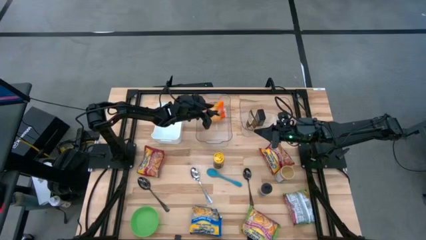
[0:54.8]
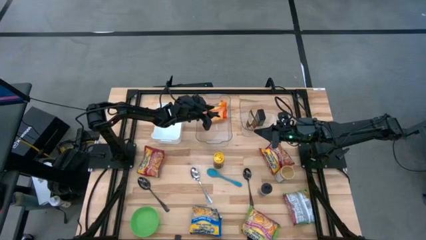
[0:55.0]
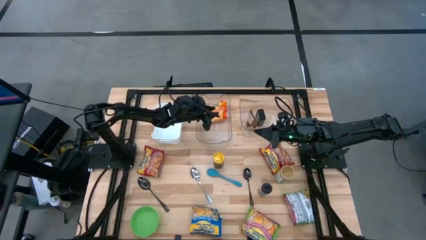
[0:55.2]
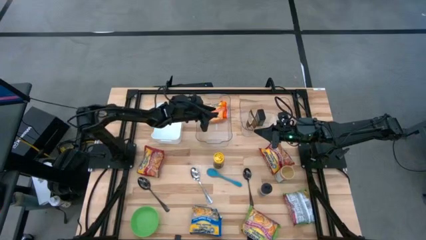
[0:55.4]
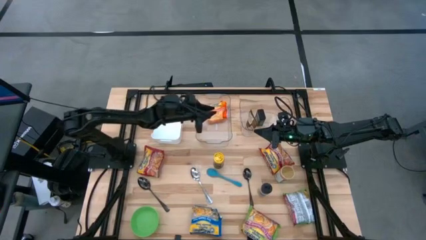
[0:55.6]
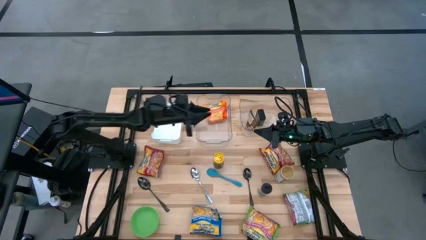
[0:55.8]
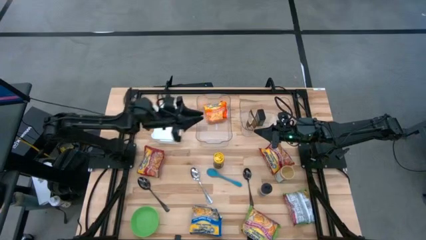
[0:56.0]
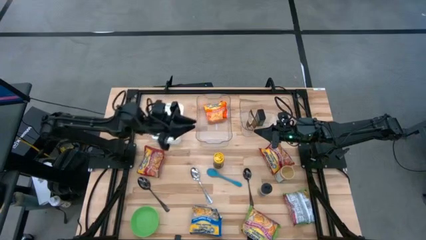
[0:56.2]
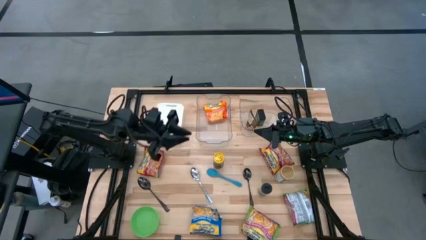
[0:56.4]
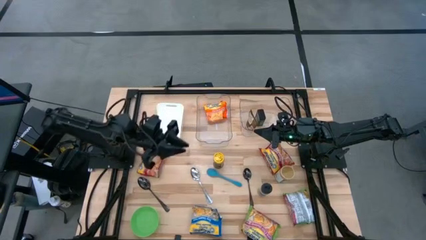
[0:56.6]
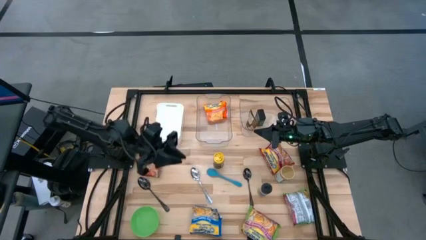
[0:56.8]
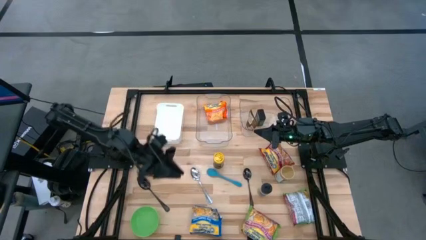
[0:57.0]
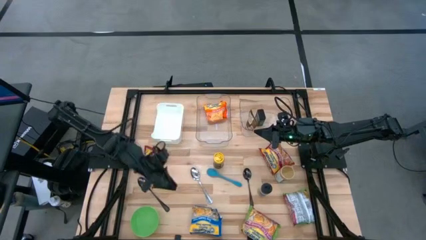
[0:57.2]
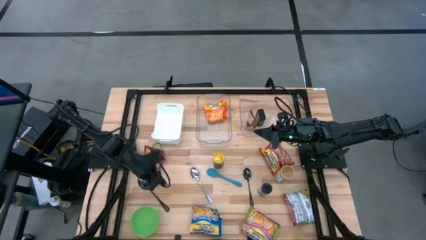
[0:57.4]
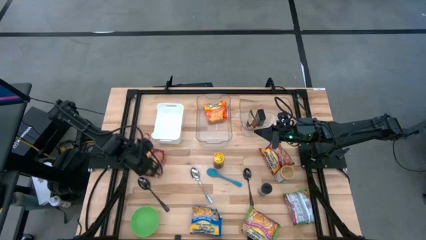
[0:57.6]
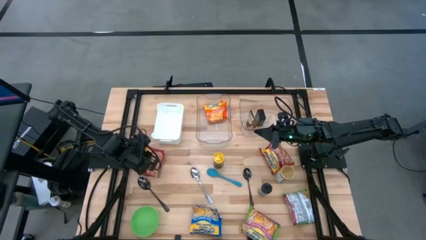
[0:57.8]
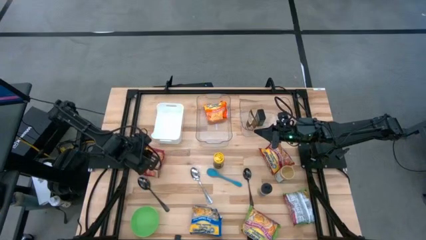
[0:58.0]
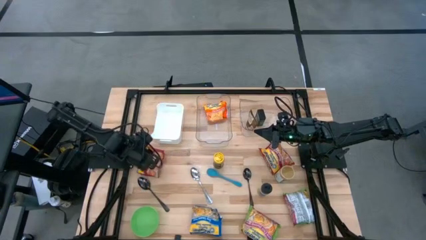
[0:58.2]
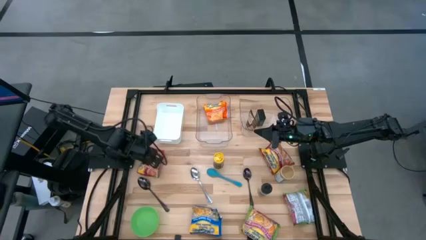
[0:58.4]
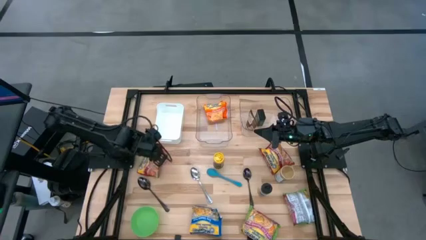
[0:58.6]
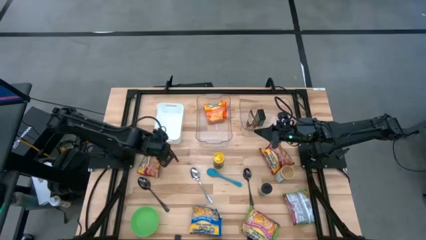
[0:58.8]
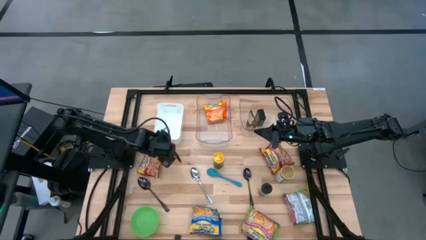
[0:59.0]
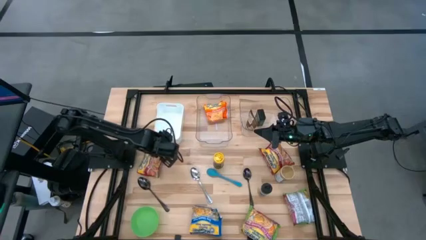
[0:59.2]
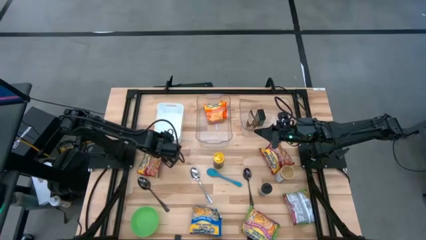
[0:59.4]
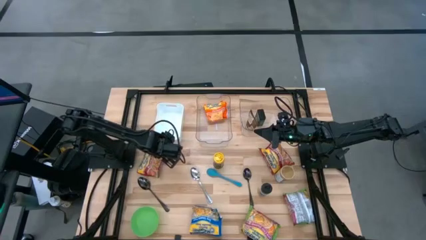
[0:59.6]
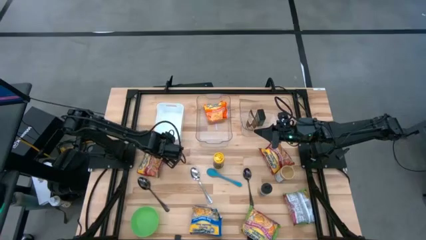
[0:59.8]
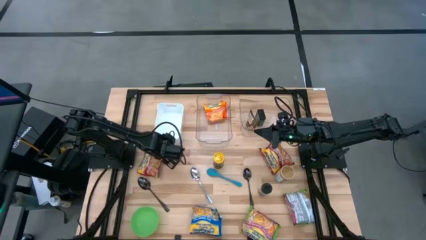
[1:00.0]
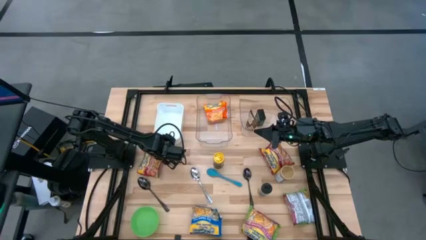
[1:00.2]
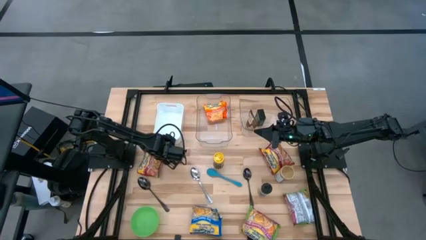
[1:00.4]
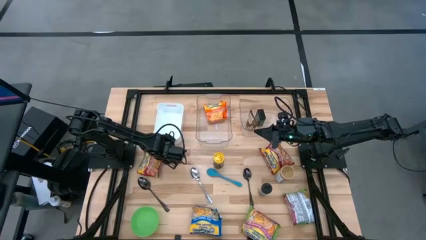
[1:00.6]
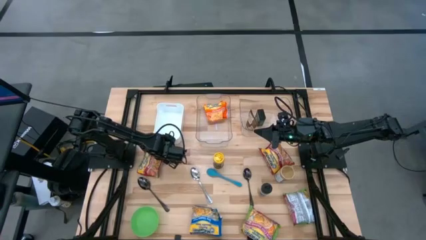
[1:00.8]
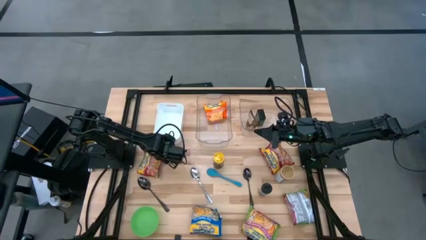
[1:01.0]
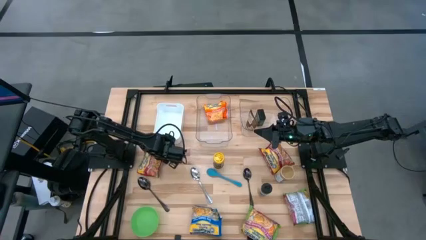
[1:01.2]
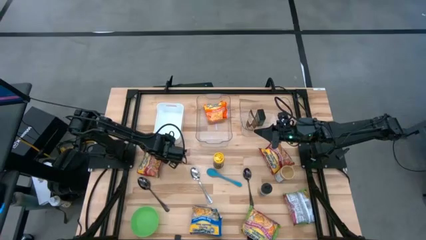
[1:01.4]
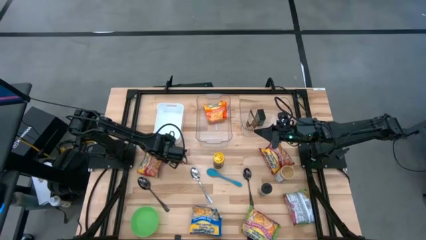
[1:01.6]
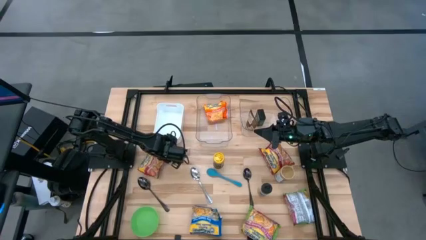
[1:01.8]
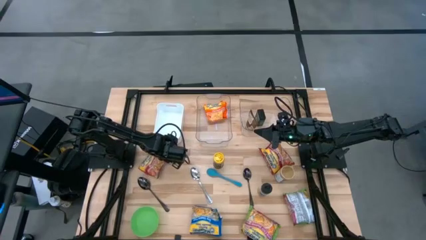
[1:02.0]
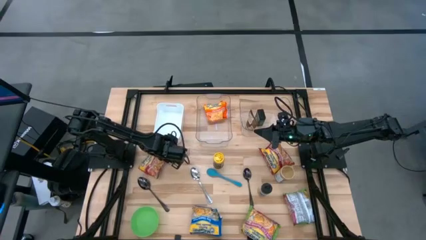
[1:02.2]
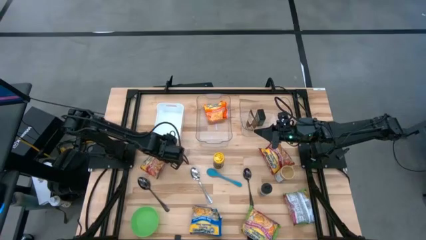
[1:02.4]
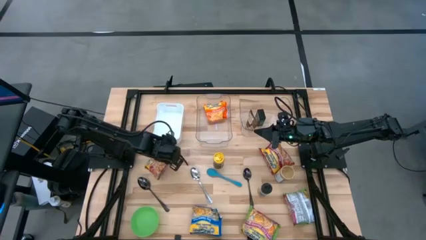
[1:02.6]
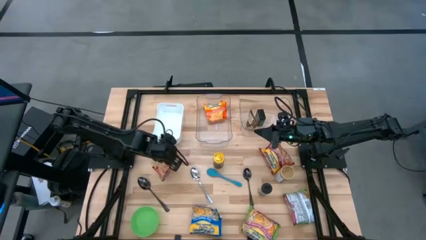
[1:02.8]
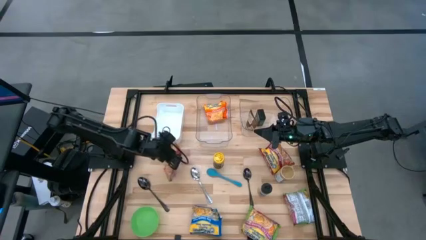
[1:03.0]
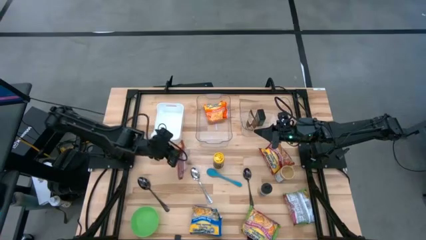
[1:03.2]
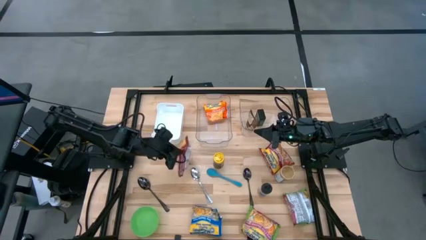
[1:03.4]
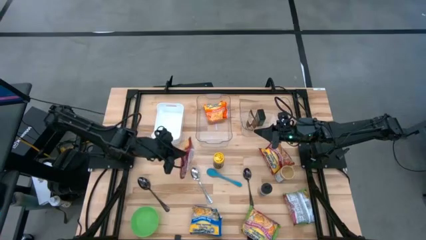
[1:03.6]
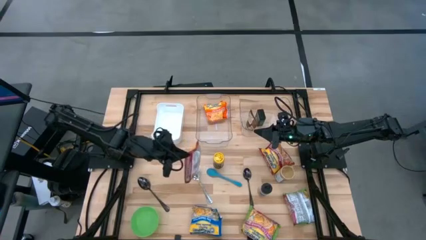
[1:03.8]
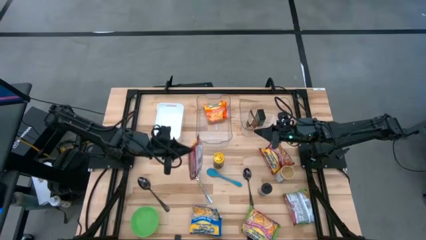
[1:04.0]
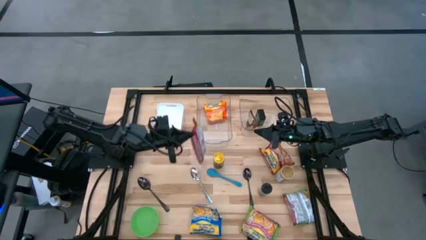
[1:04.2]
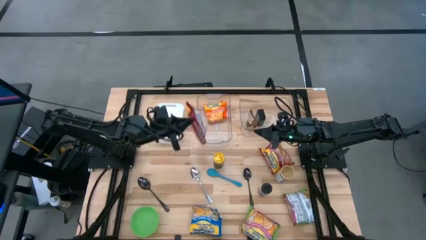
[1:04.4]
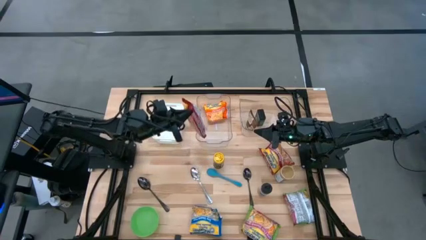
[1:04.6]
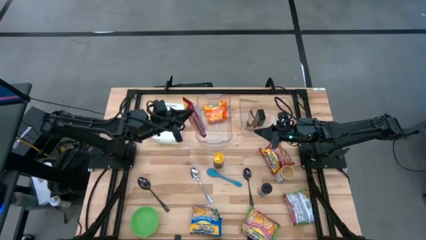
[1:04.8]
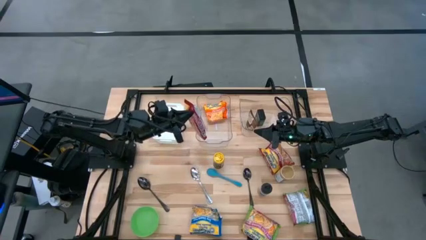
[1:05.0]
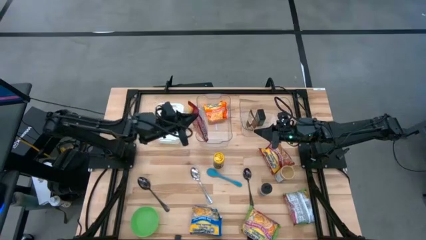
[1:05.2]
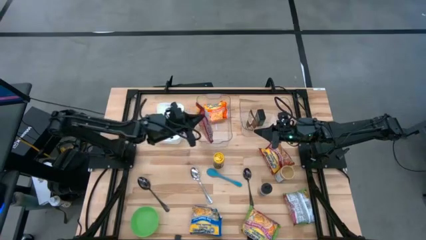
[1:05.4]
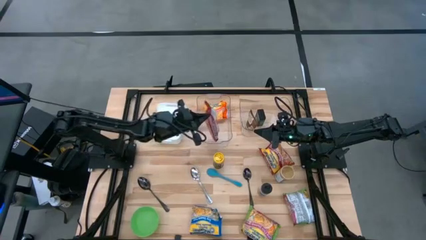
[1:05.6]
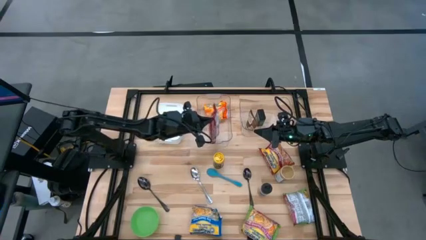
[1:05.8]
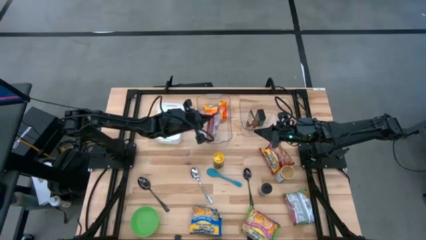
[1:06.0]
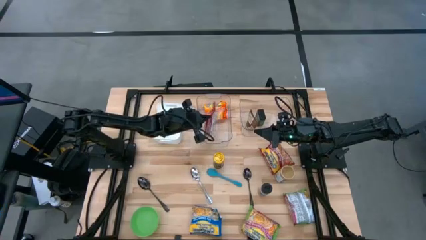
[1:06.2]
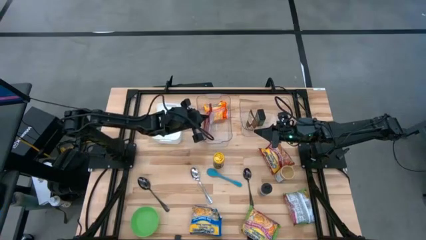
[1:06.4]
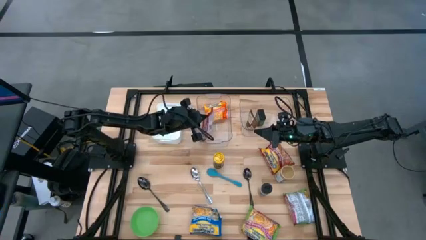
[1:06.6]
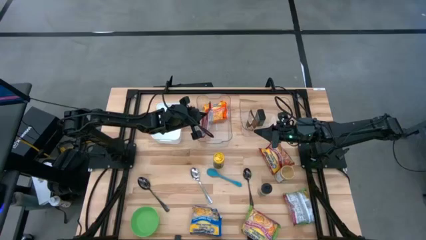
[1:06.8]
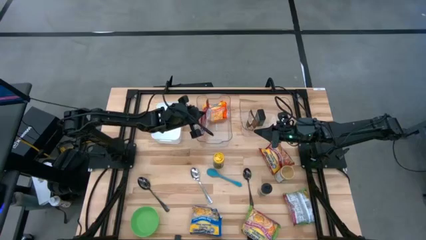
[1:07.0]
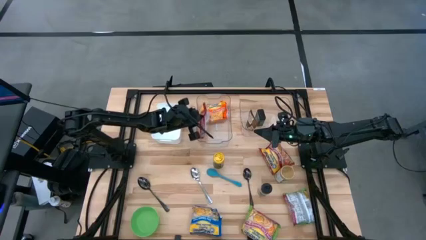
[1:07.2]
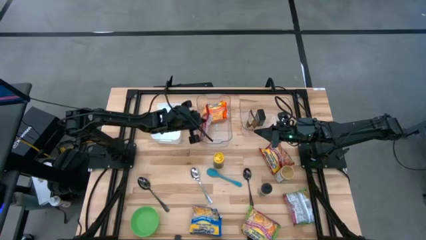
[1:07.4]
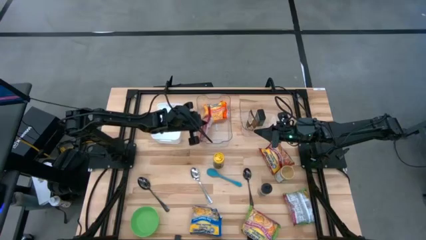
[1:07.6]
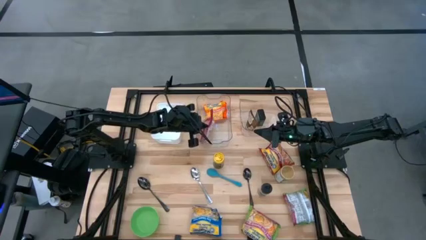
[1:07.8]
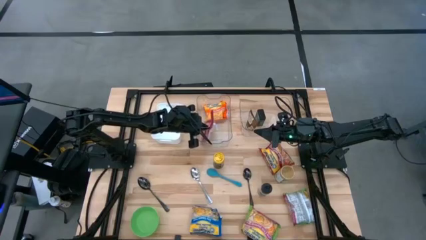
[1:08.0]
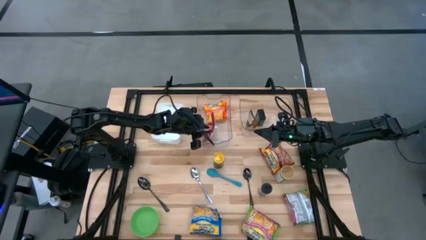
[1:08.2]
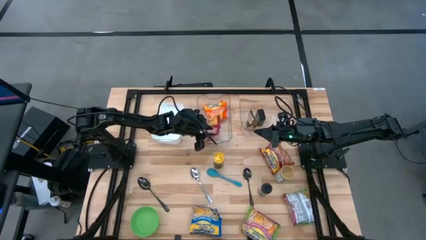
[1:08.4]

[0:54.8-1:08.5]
Task: Pick & Place Food Item
Put the left red noodle pack into the left transparent bin
